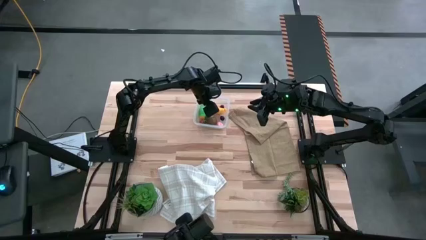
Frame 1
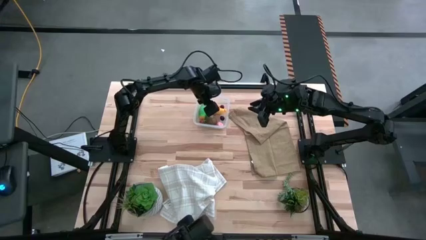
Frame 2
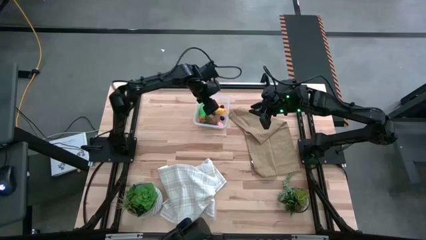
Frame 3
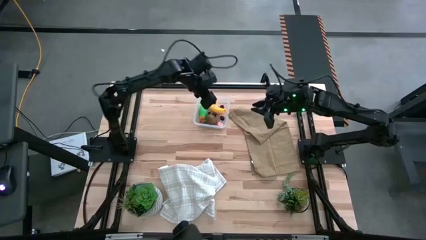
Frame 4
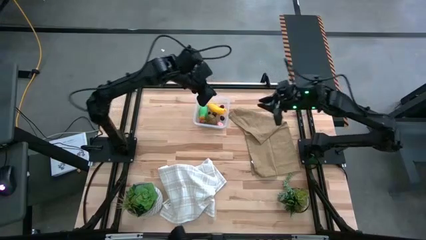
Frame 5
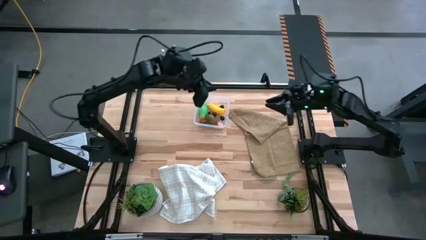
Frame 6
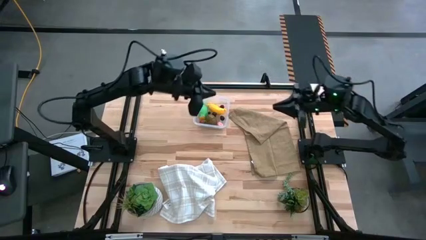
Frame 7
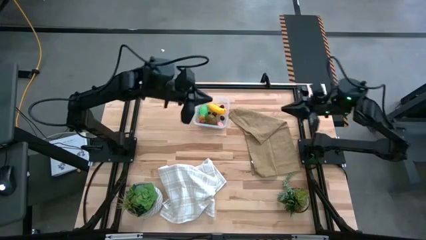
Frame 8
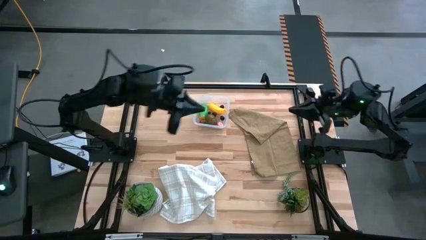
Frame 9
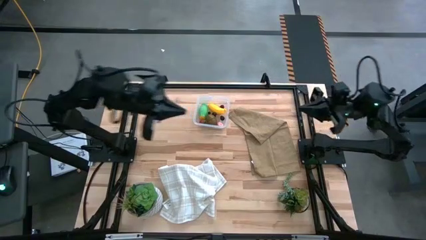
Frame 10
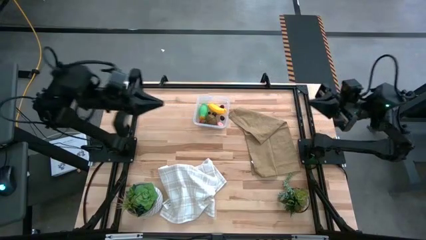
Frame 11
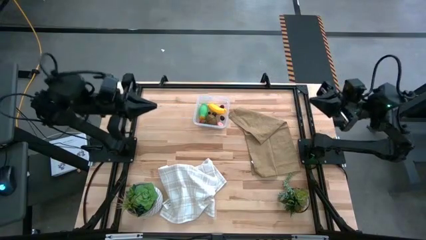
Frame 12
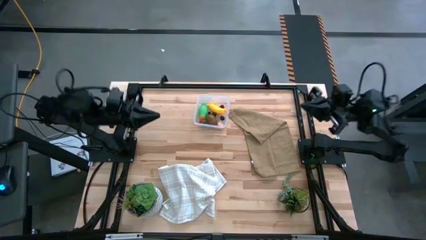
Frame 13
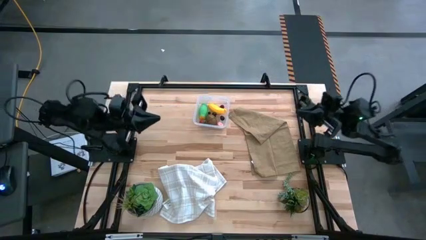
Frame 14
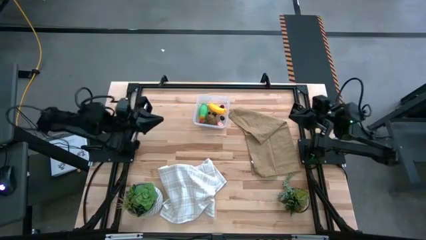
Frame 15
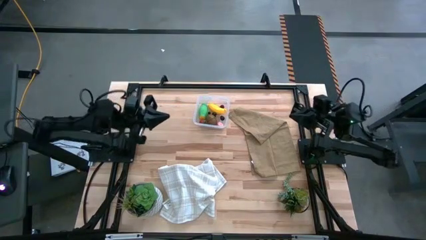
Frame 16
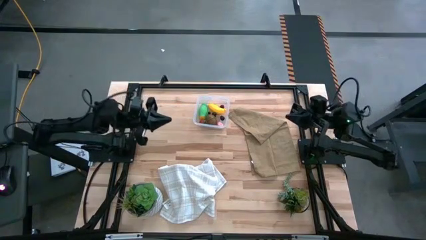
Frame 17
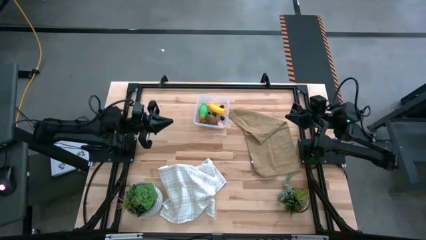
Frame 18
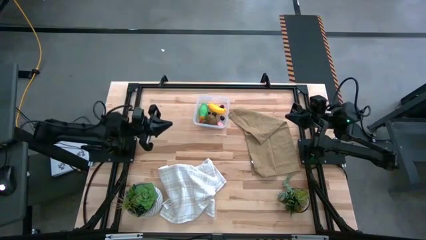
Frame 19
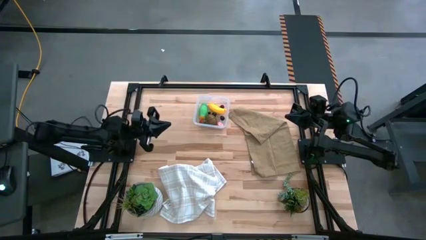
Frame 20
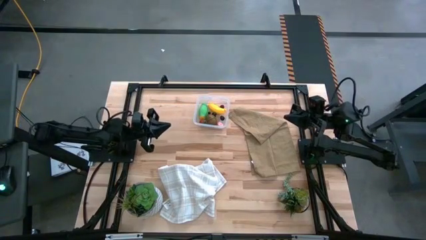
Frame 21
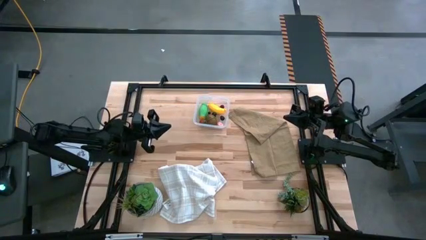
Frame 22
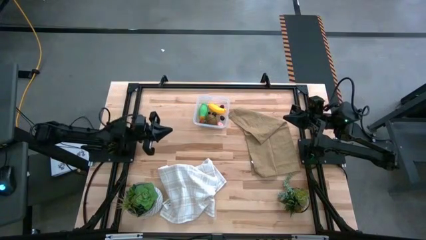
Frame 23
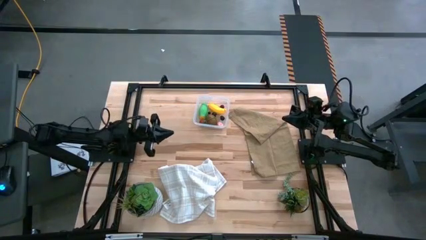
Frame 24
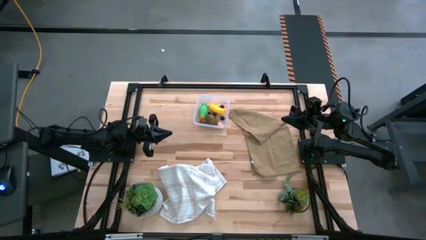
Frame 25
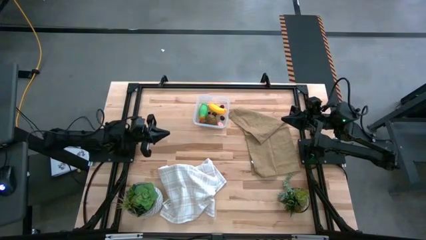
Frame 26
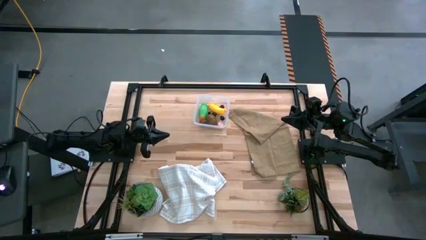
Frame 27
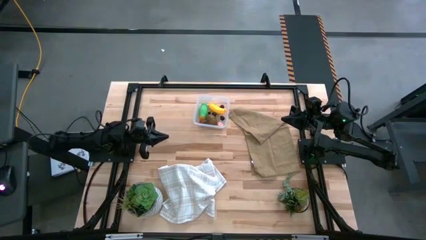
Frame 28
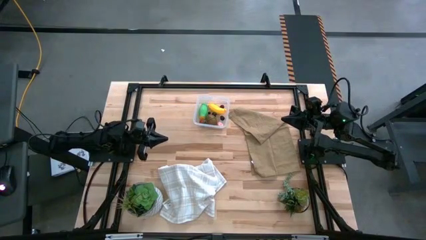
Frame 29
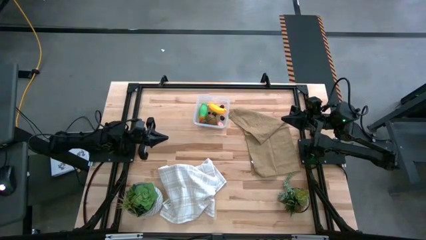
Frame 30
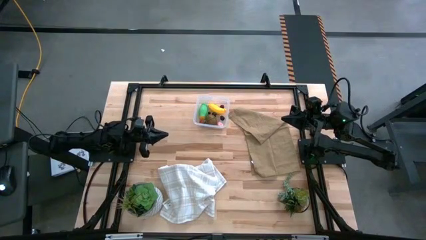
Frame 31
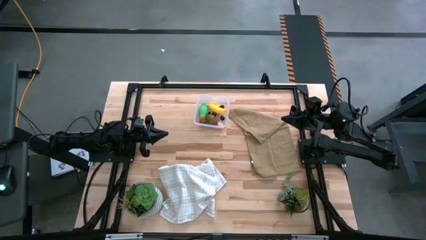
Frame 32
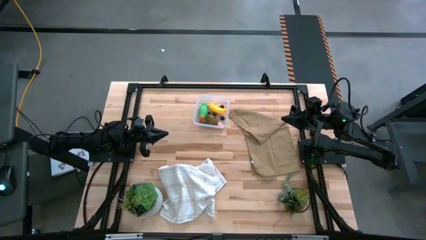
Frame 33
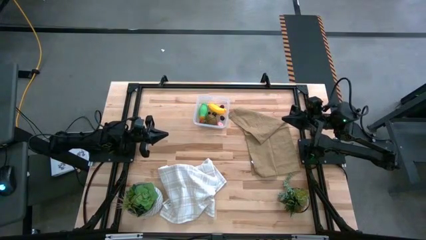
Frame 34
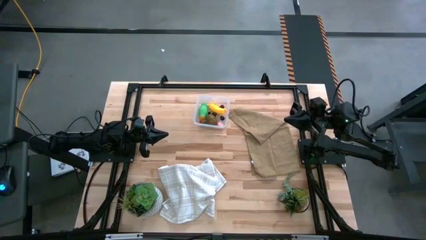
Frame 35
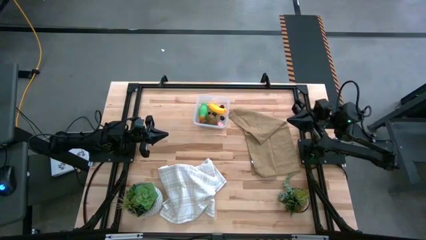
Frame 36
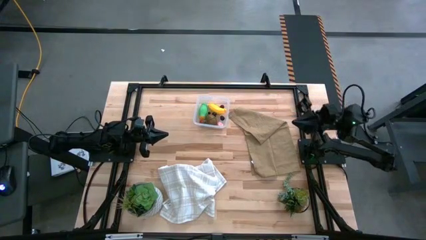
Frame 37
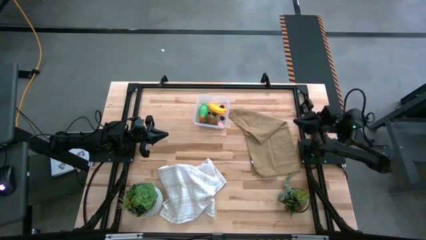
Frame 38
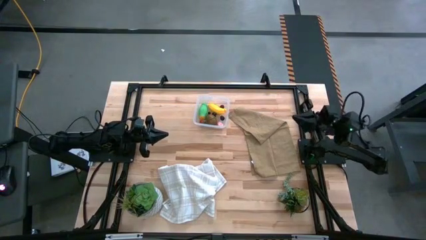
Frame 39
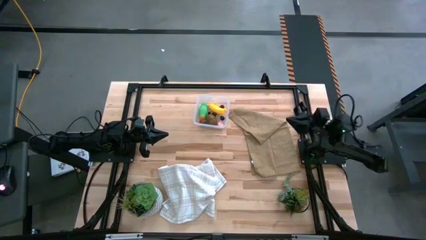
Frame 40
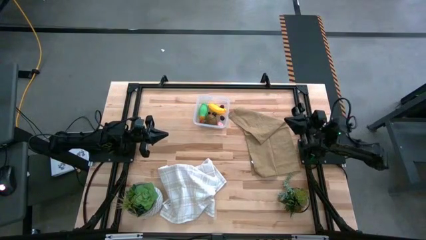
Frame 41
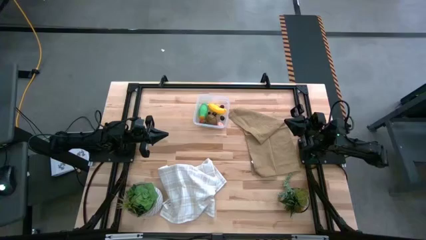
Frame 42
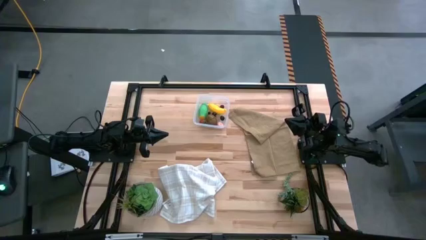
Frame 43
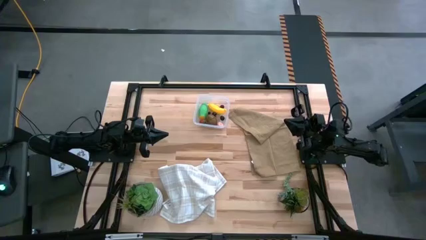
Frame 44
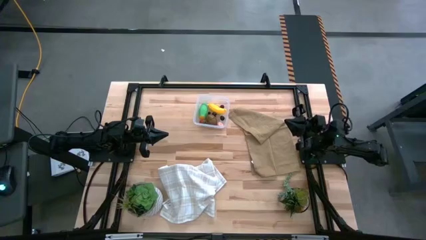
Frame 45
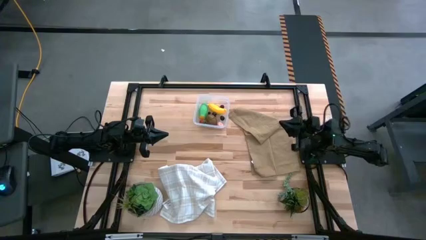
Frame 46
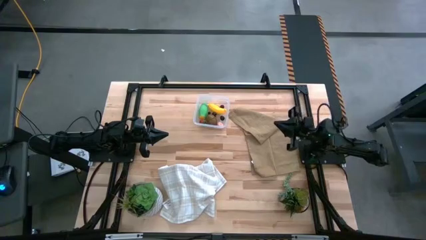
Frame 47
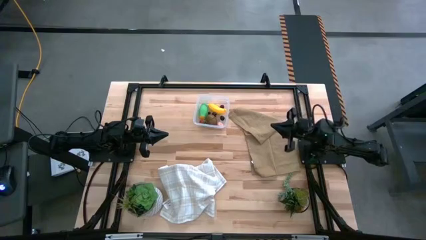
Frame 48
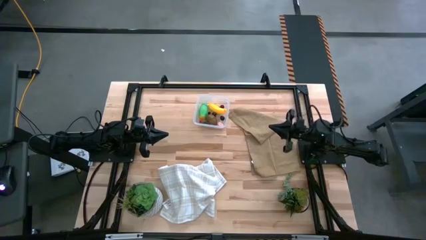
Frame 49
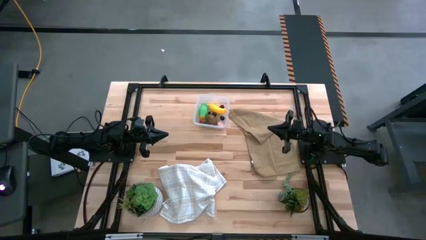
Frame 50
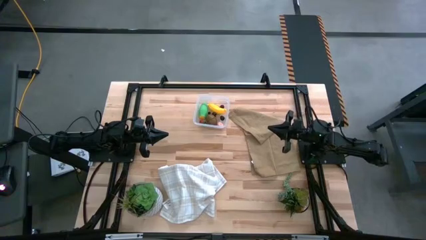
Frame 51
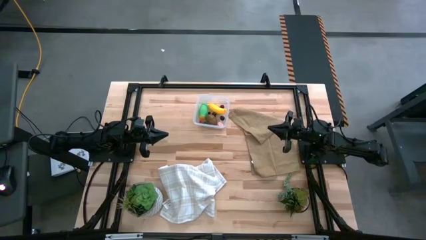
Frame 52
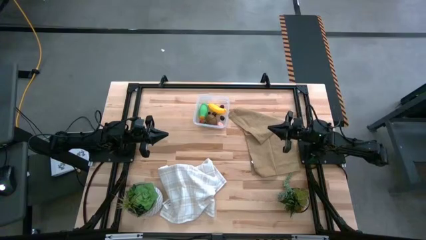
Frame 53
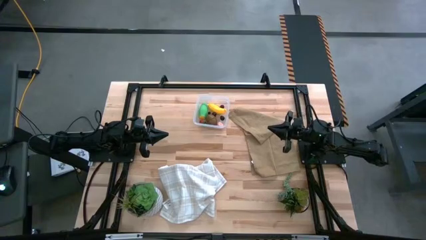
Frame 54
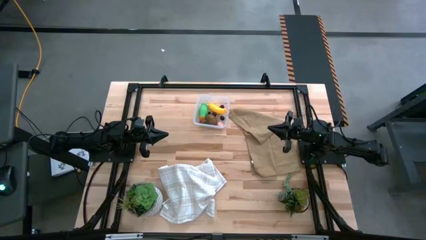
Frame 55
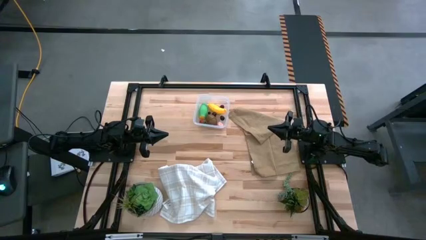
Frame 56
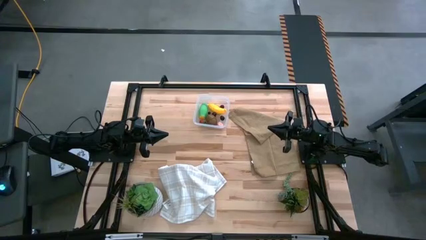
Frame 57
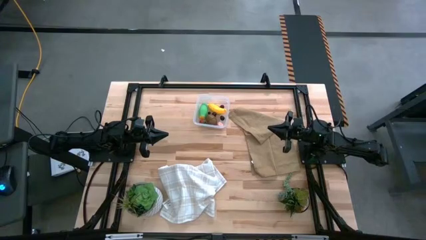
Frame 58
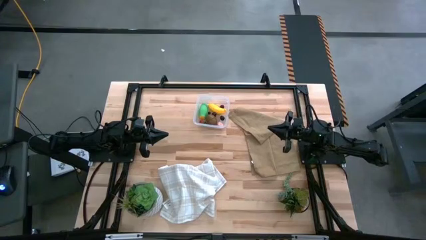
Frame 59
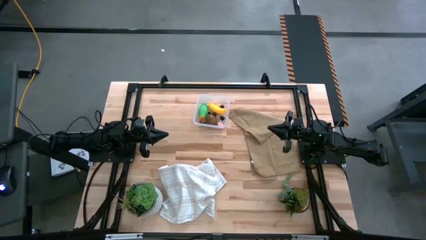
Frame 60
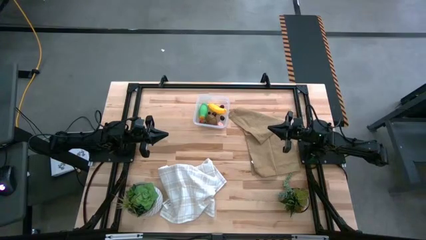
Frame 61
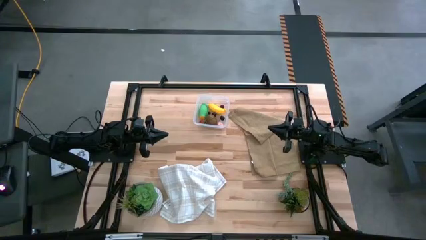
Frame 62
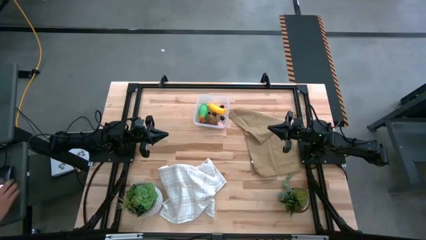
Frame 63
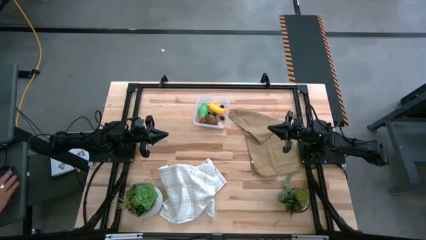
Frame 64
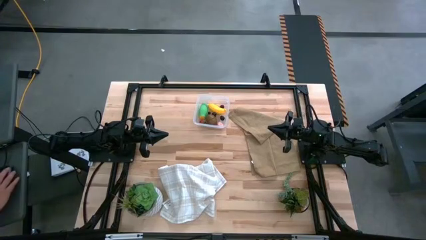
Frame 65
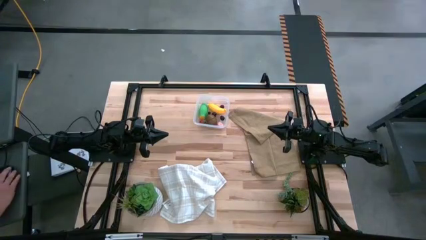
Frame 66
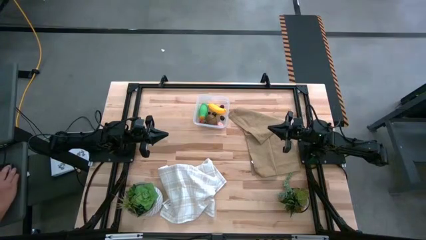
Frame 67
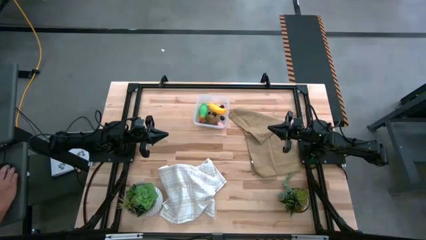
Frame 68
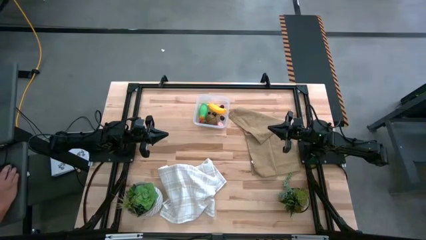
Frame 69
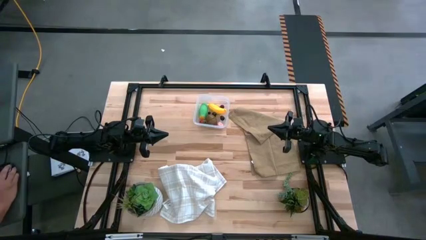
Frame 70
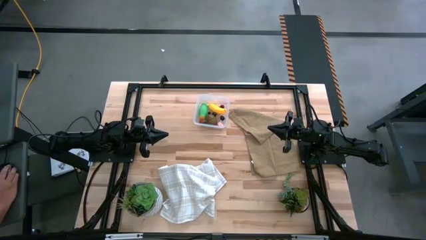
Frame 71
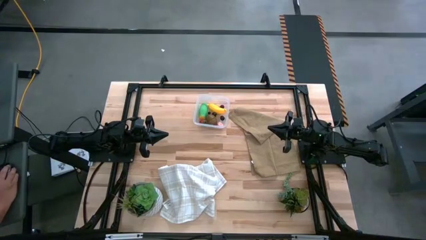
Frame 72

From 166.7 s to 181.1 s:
Task: Pick and placing Produce into tupperware
Return to Home Position
